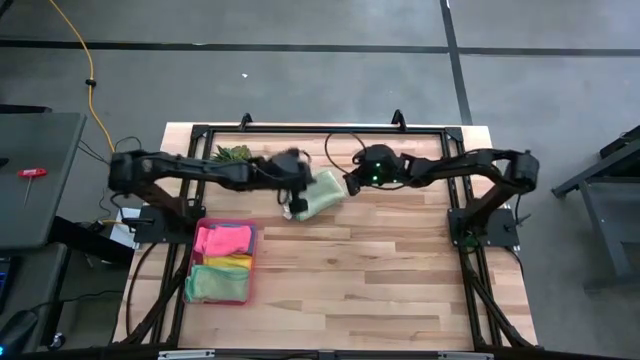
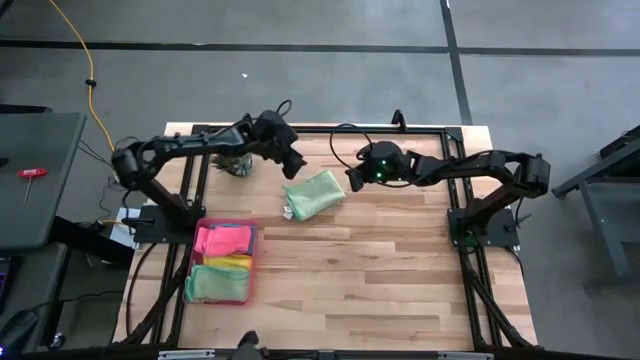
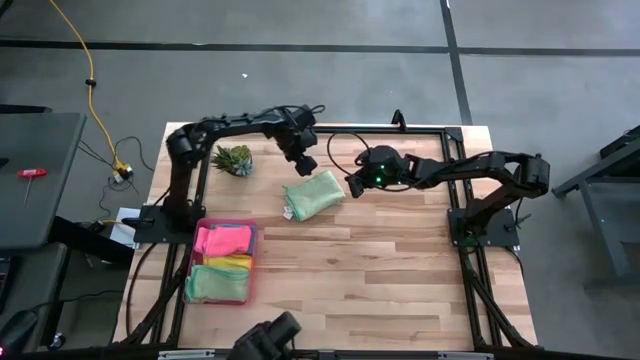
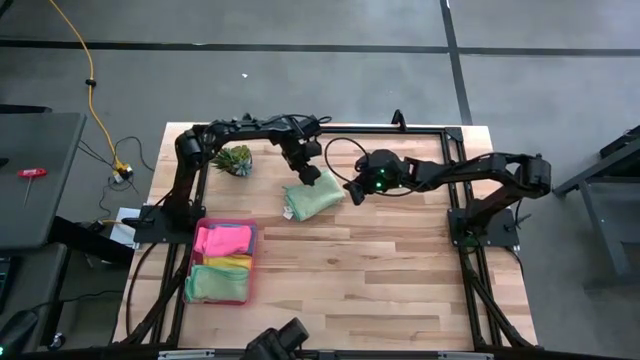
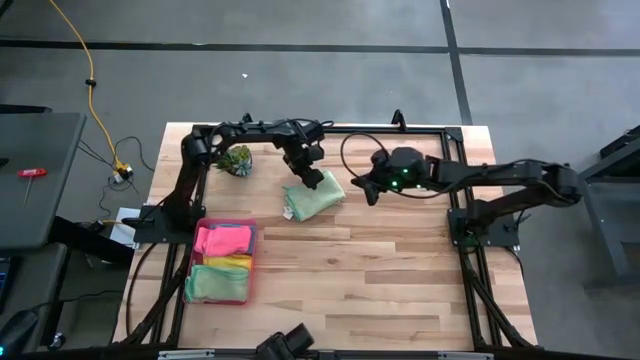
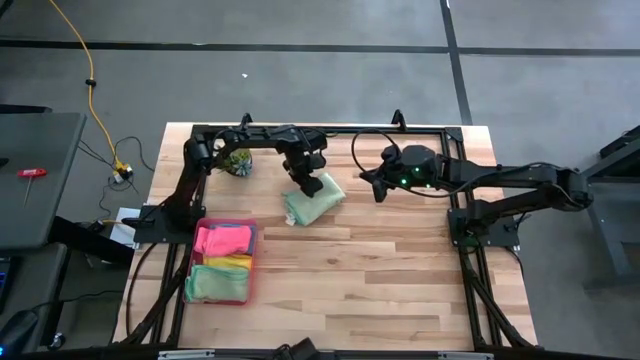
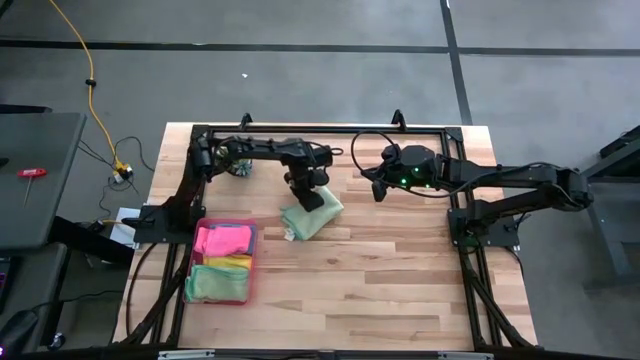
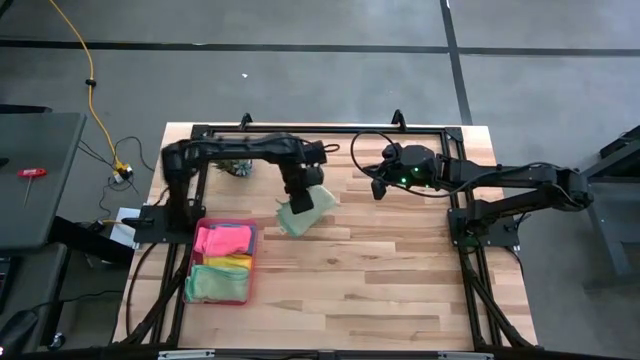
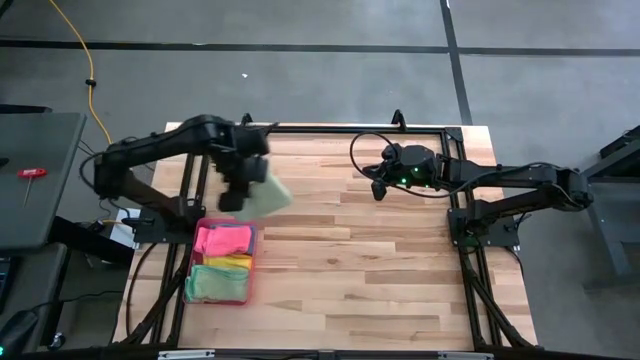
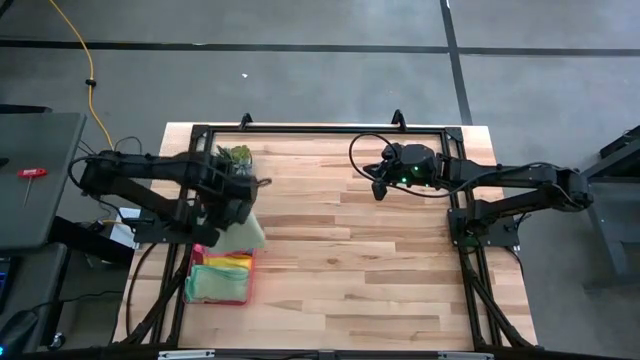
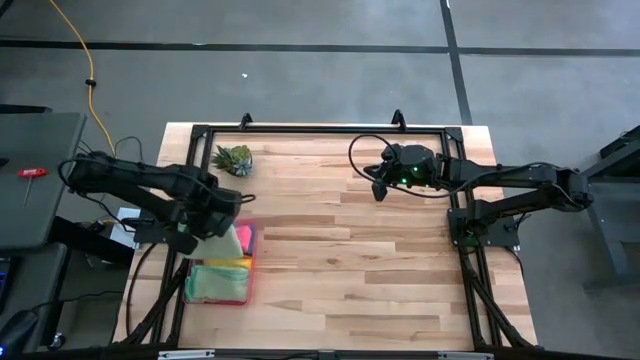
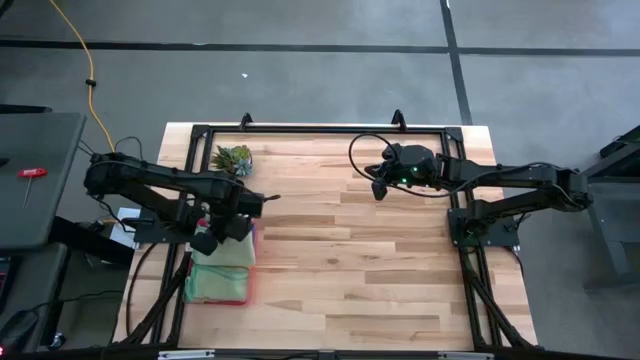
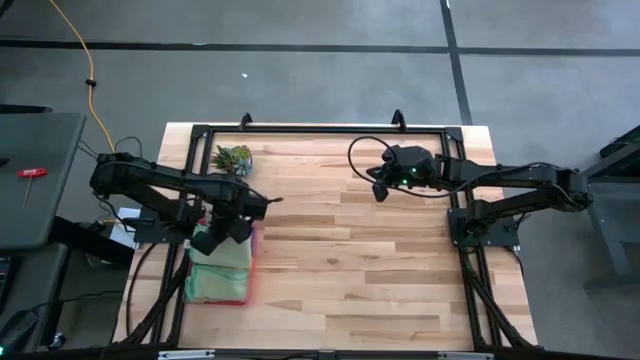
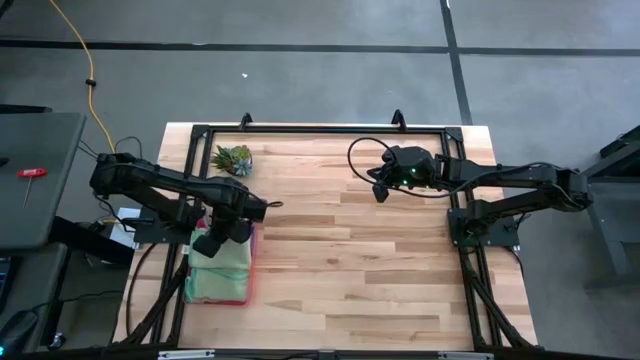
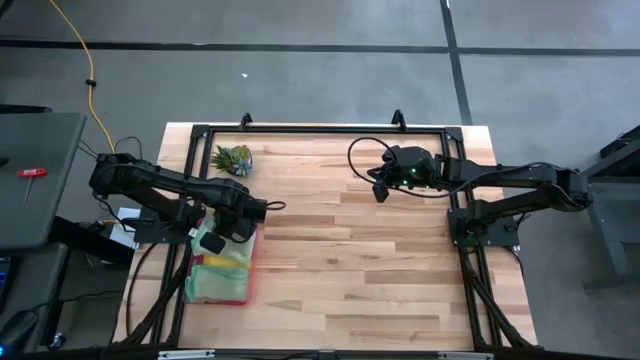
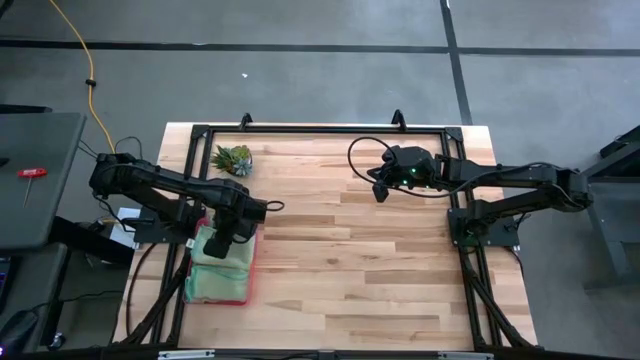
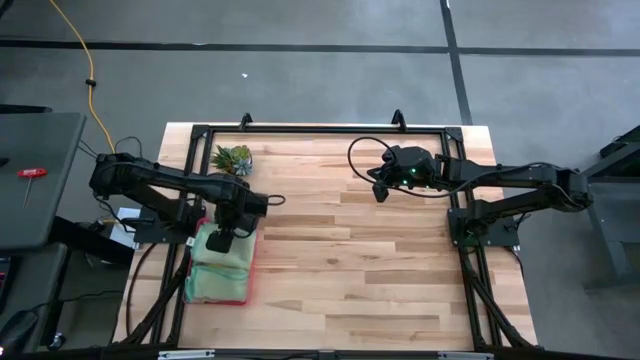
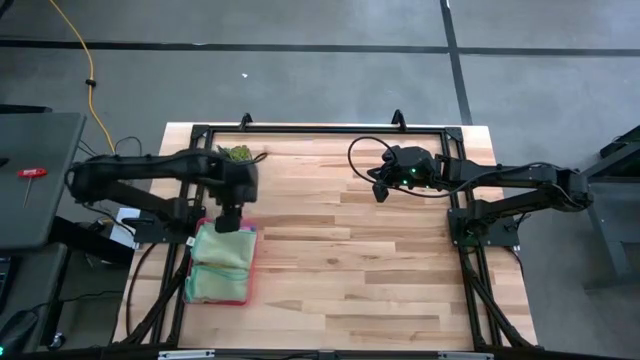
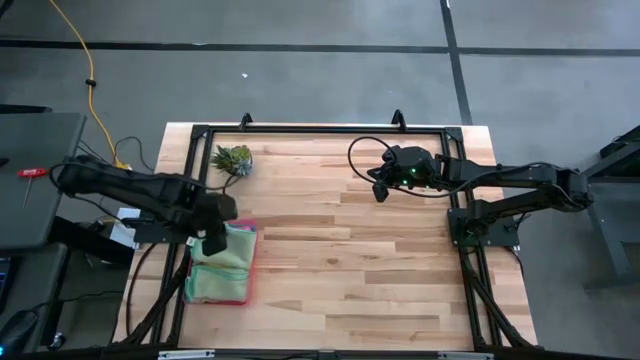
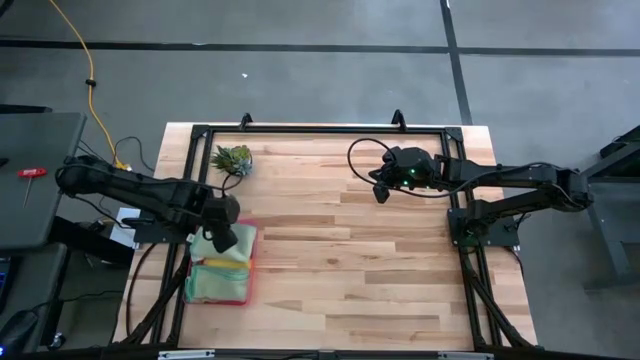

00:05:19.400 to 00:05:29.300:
Task: Fold microfiber towels
Put the green microfiber towel into the red bin

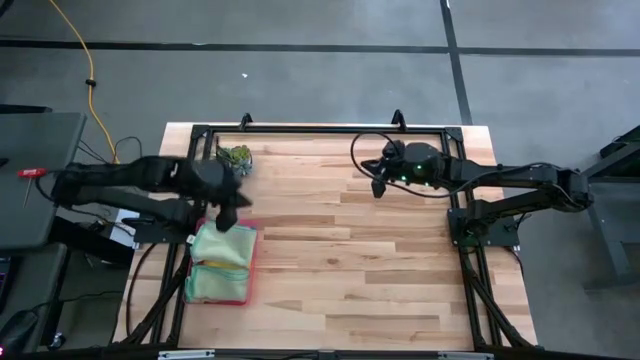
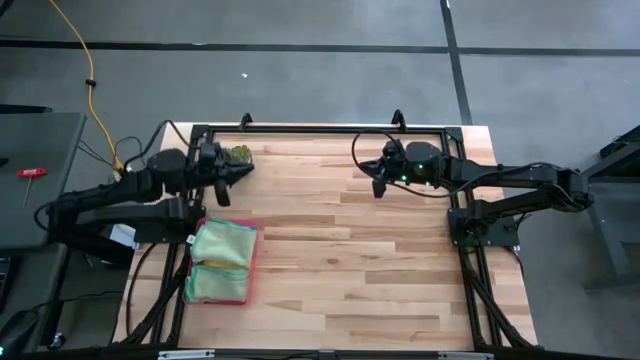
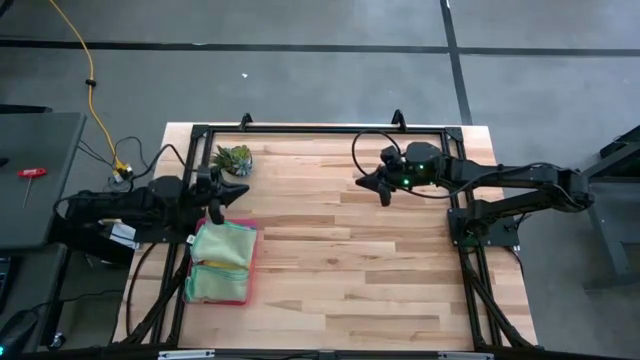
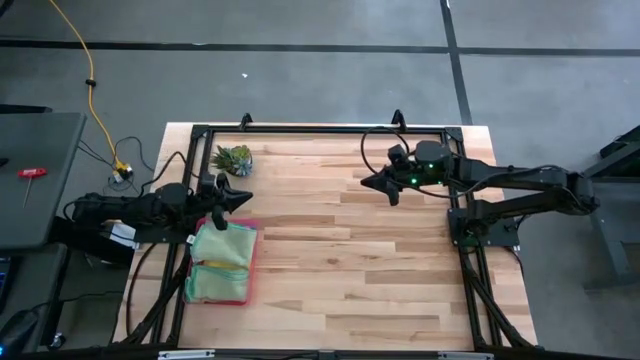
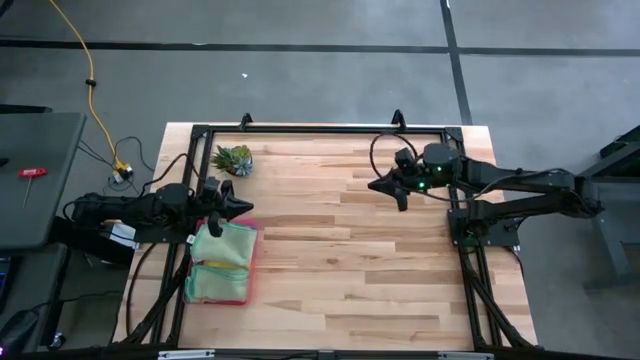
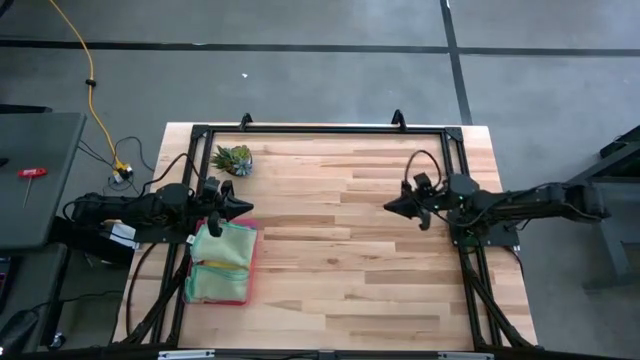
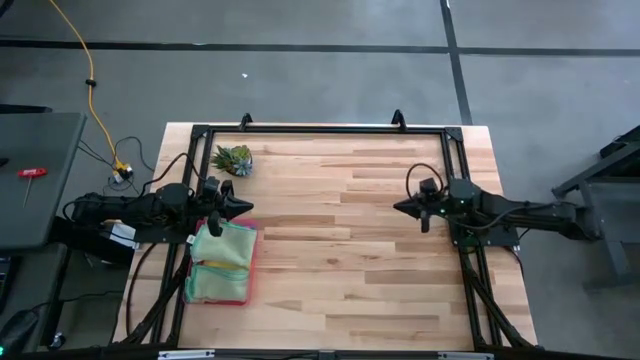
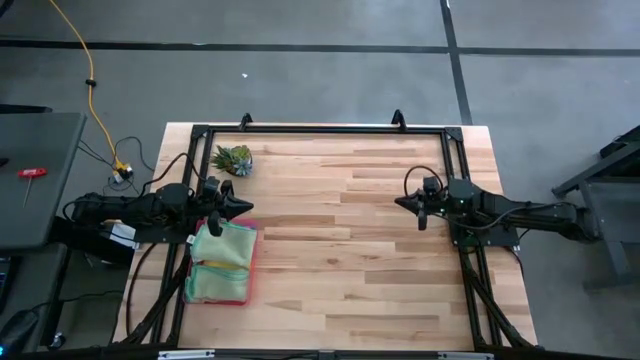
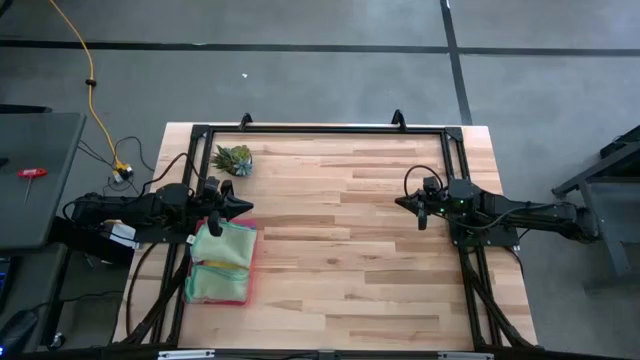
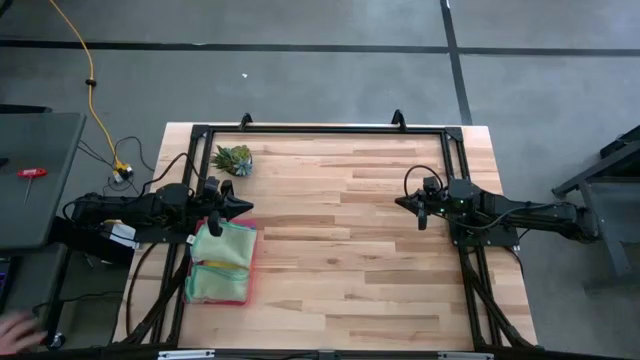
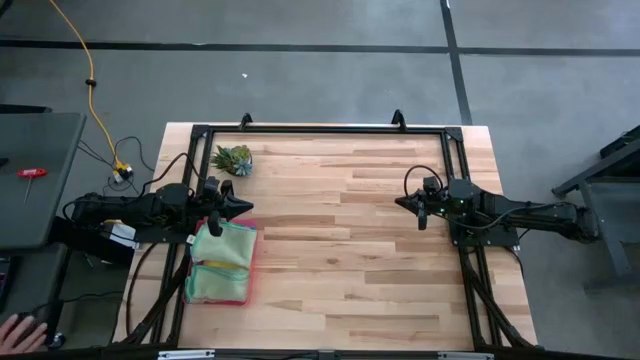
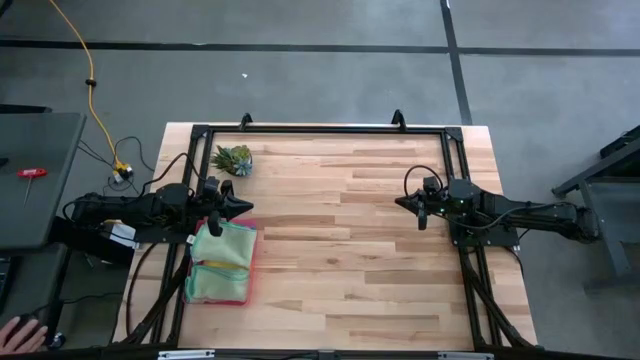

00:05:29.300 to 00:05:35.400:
Return to Home Position
